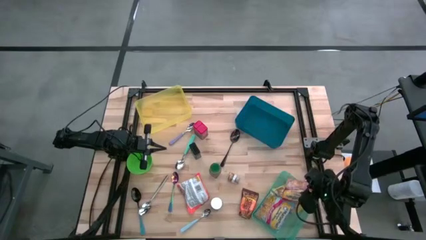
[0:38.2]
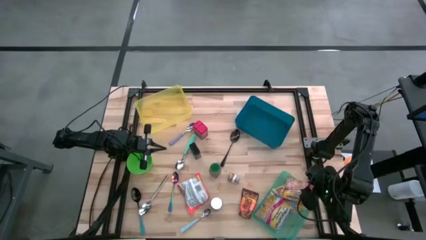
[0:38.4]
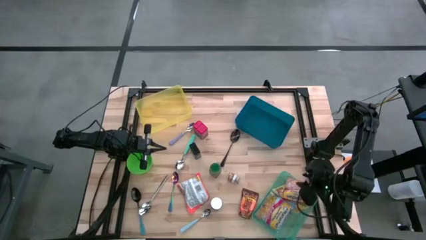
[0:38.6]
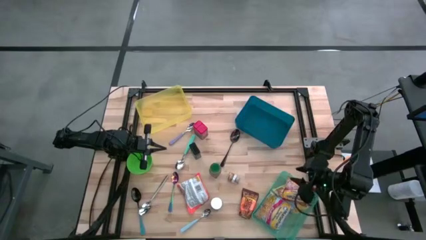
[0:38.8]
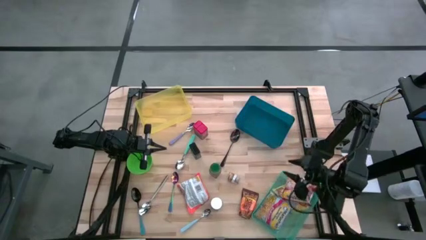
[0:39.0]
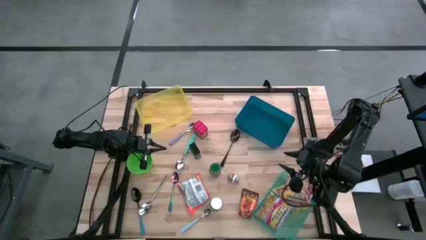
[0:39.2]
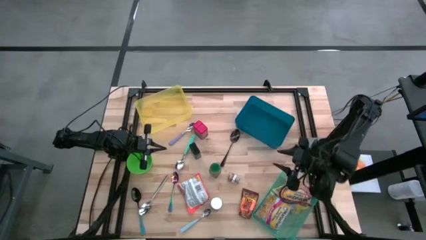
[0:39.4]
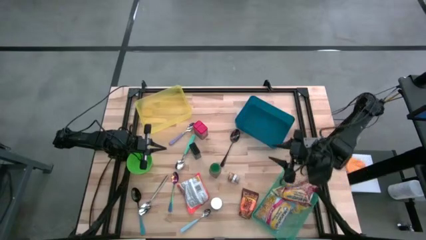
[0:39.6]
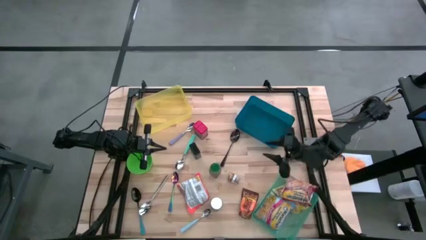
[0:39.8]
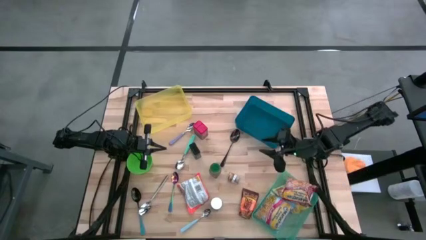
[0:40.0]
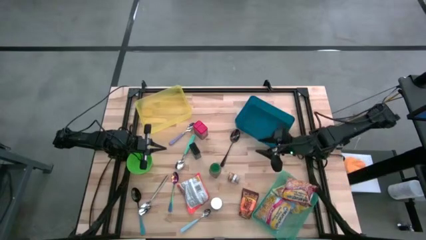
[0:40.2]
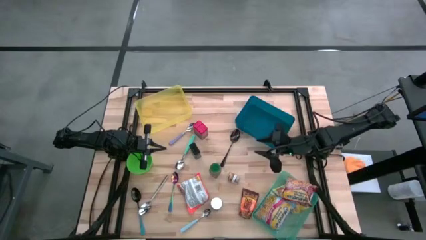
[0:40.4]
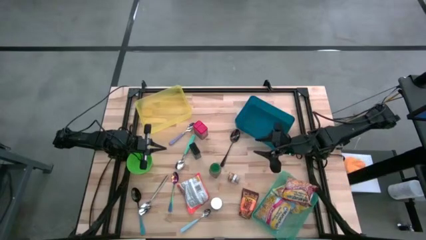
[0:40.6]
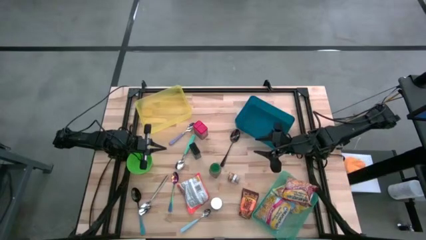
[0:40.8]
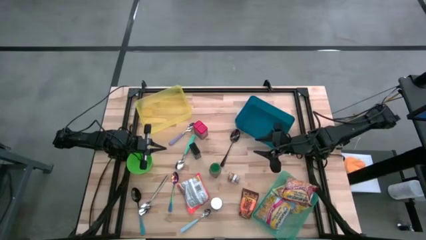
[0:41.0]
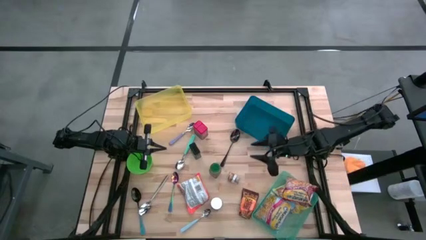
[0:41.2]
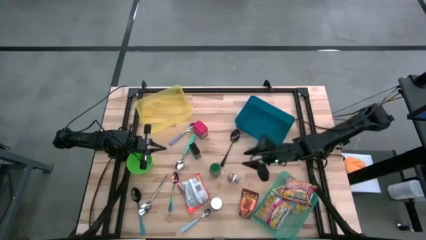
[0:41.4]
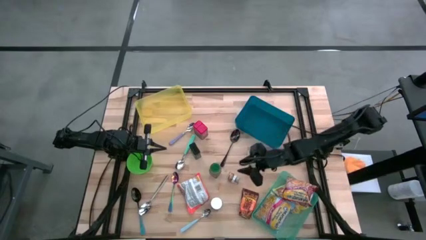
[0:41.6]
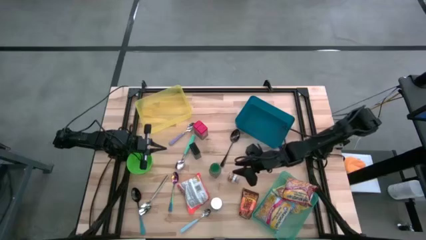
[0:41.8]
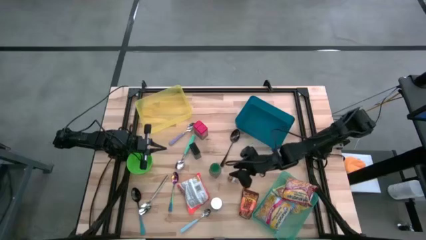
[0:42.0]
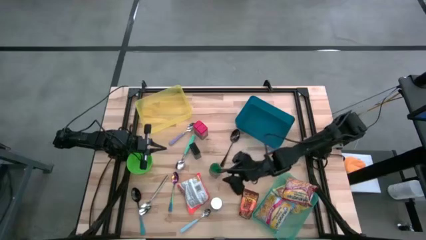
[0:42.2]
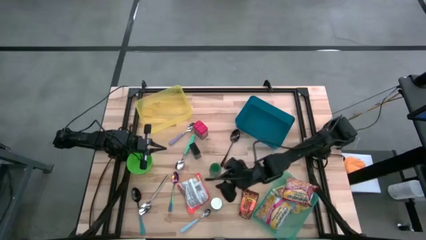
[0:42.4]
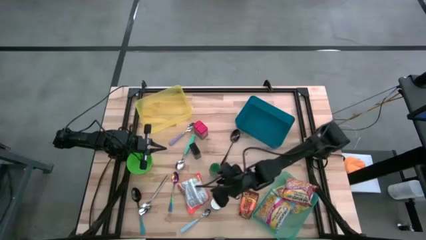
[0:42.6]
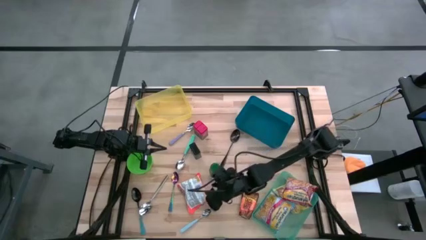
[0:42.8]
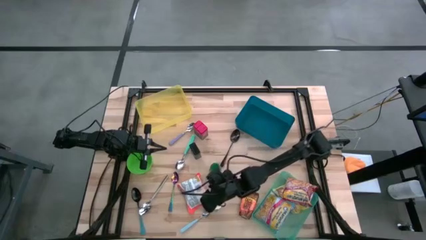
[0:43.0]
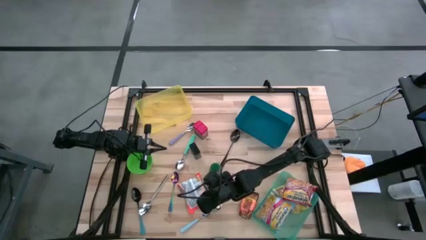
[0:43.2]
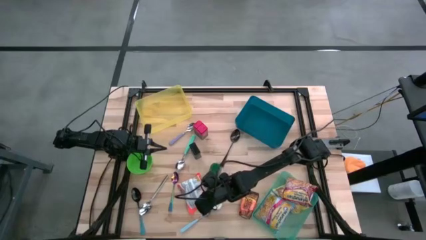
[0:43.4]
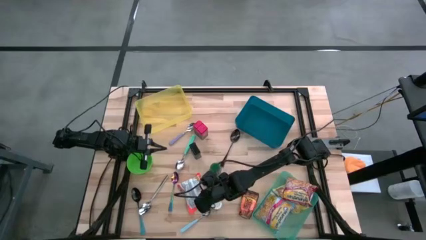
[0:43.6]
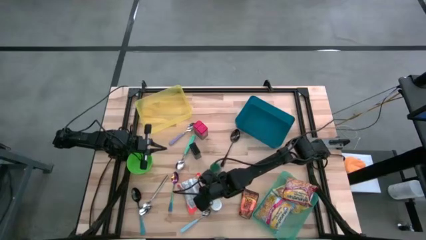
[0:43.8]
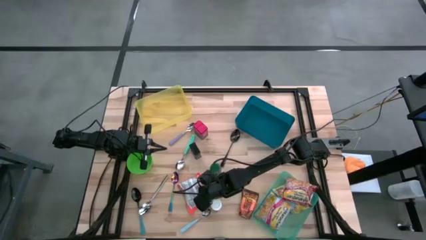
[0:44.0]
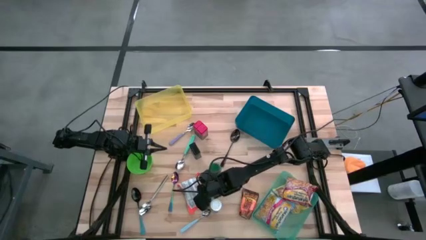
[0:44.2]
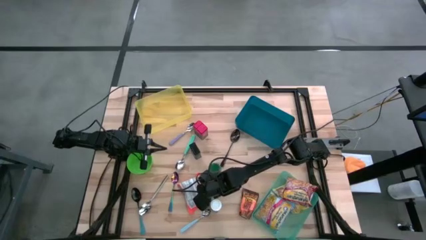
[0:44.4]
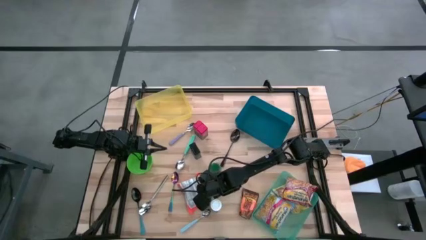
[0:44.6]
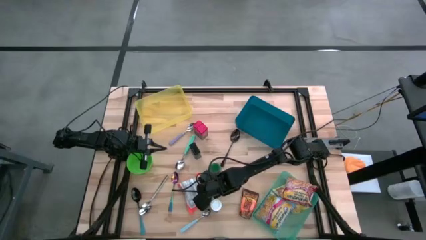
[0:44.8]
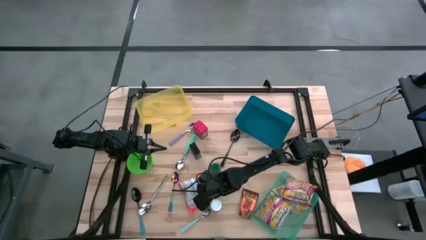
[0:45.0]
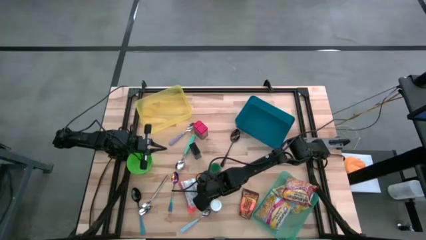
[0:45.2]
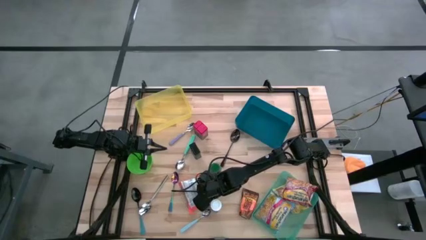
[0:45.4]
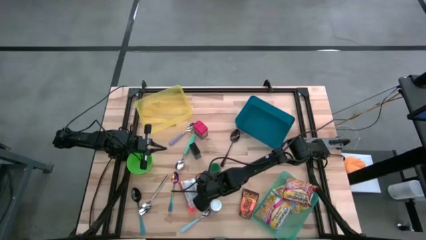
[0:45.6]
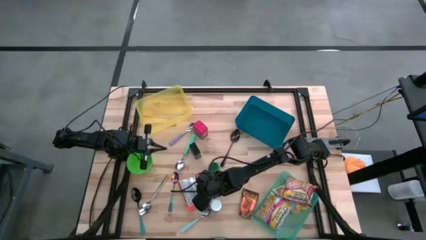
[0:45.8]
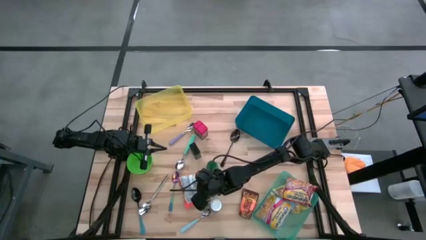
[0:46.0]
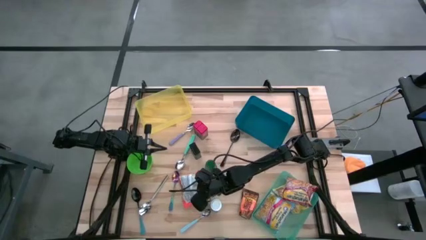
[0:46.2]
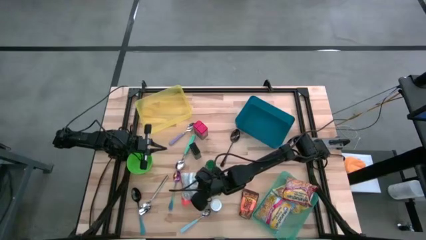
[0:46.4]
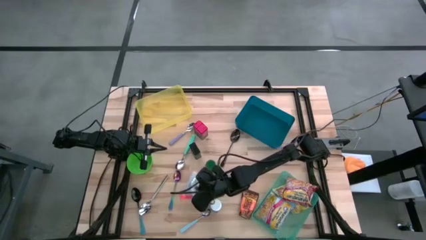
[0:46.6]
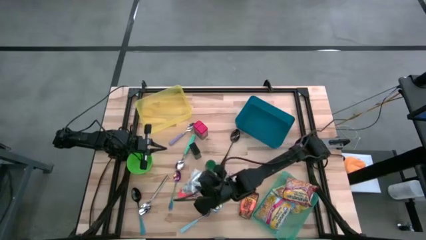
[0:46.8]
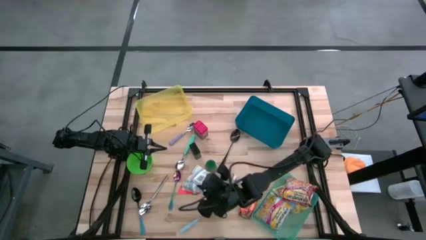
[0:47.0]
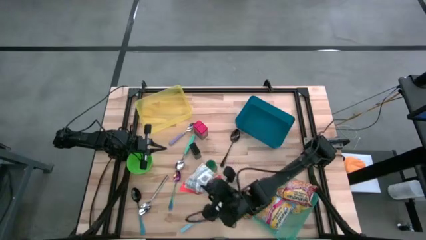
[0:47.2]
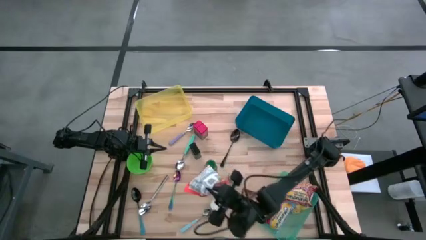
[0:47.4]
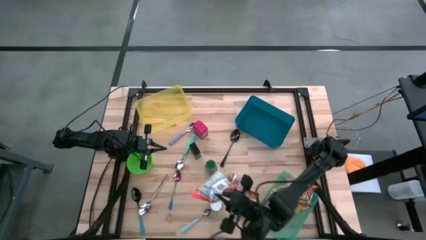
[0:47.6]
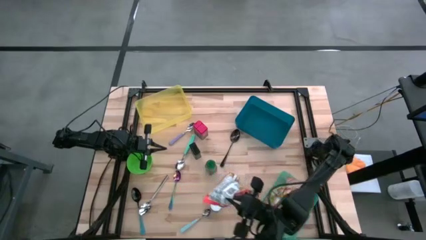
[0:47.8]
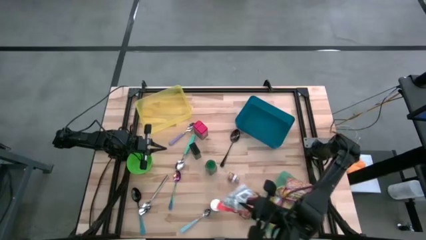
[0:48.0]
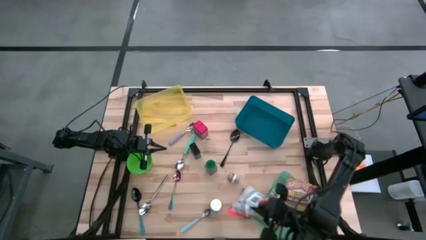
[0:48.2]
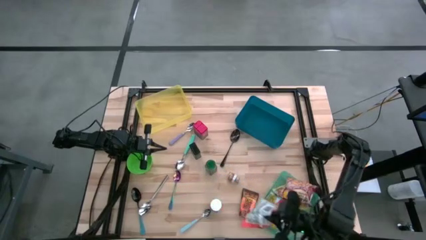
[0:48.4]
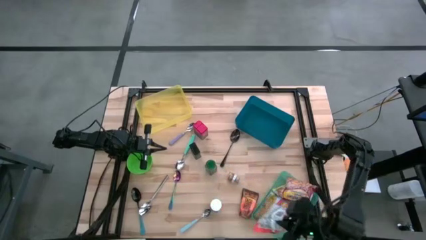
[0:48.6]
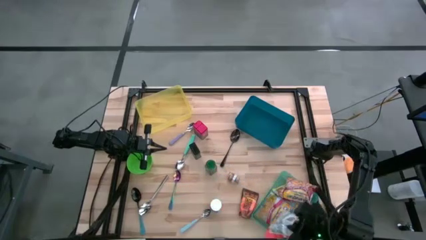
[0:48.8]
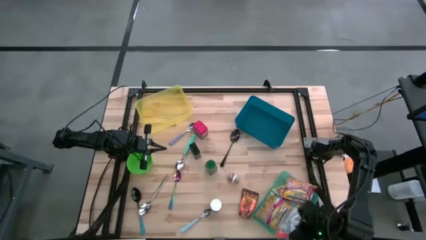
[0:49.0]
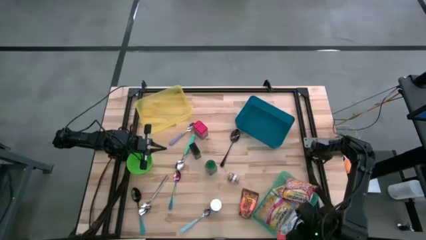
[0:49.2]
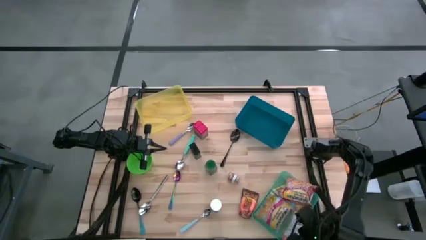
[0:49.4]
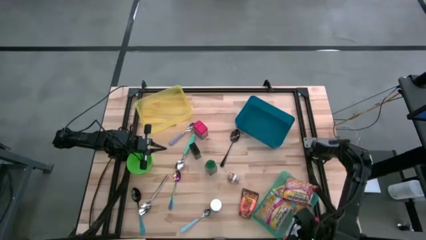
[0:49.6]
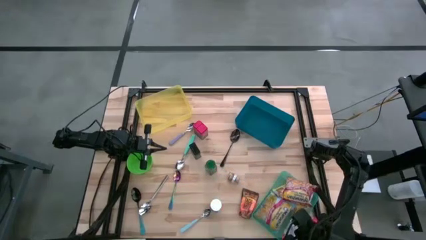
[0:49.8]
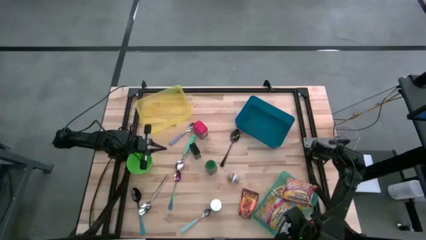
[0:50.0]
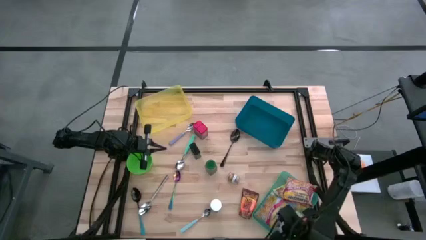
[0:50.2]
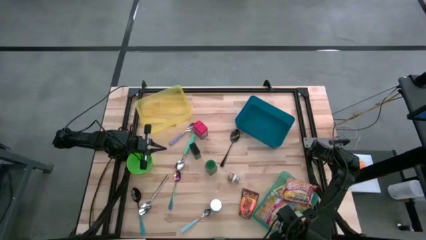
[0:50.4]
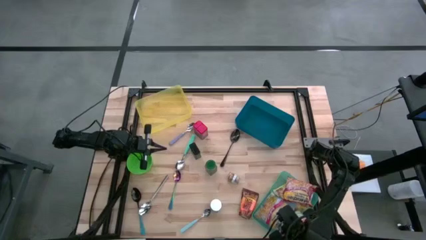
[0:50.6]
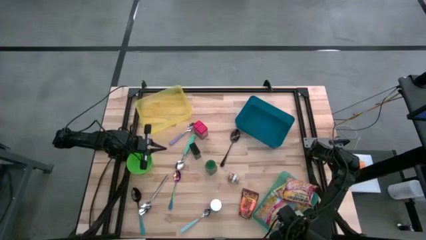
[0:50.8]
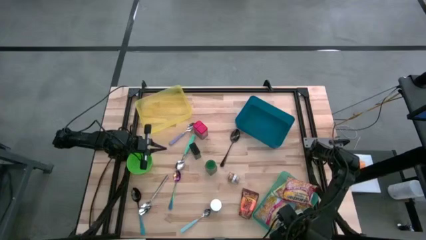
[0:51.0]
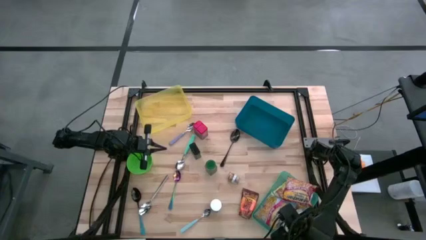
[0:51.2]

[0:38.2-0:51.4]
Put the orange noodle pack into the green bin
